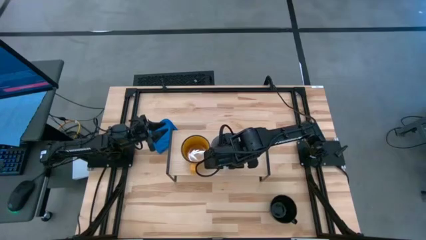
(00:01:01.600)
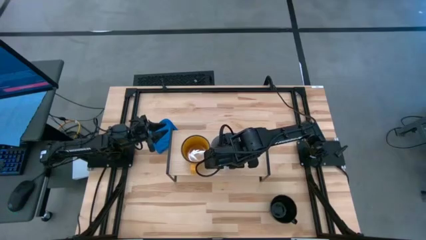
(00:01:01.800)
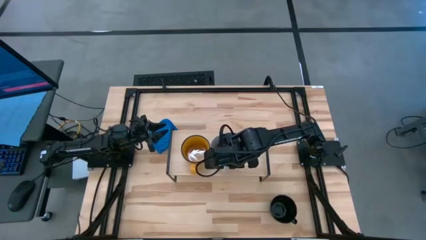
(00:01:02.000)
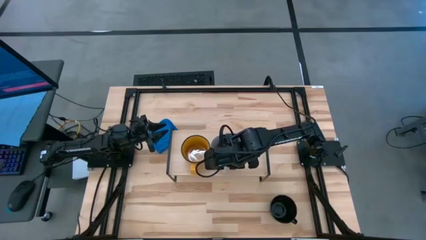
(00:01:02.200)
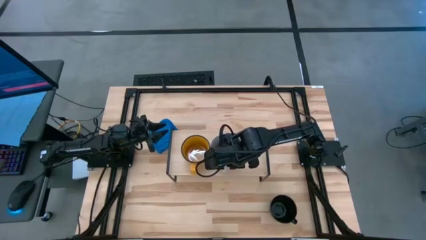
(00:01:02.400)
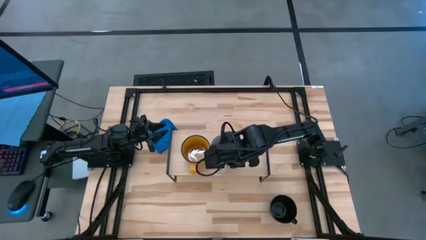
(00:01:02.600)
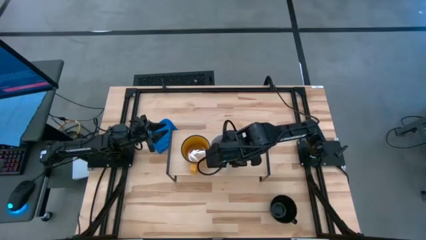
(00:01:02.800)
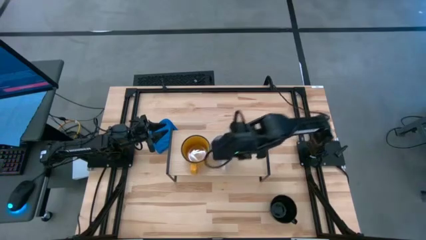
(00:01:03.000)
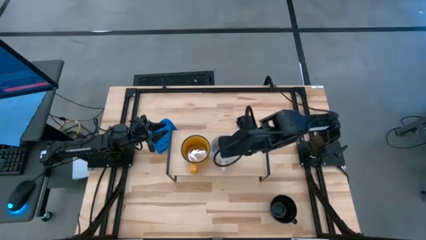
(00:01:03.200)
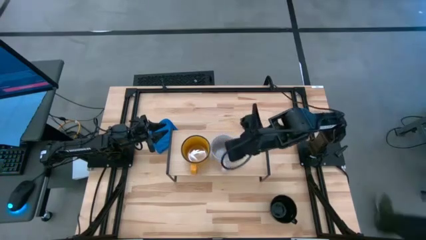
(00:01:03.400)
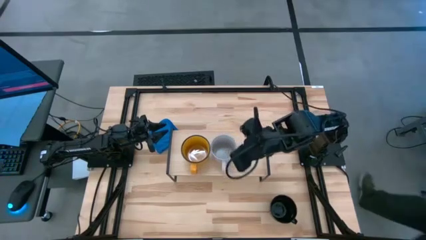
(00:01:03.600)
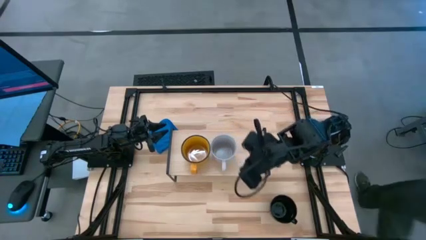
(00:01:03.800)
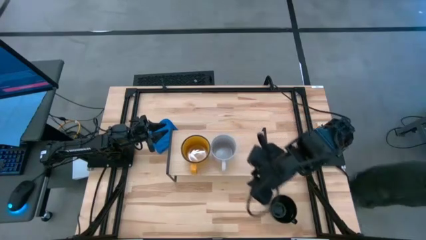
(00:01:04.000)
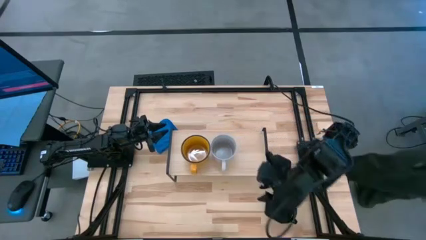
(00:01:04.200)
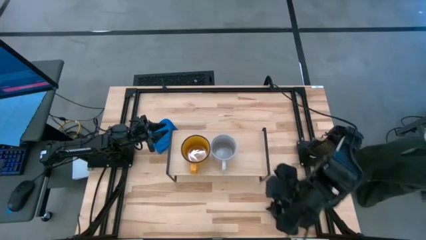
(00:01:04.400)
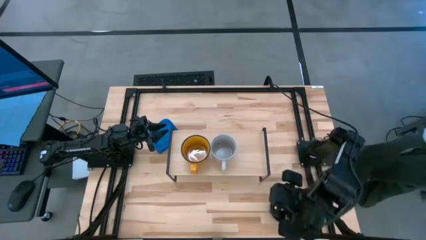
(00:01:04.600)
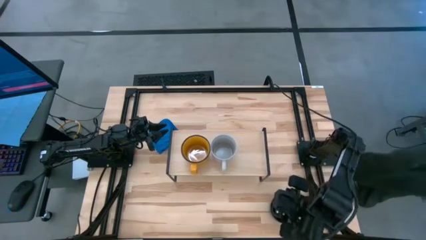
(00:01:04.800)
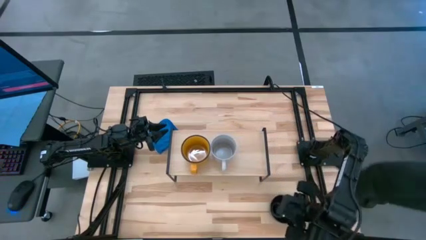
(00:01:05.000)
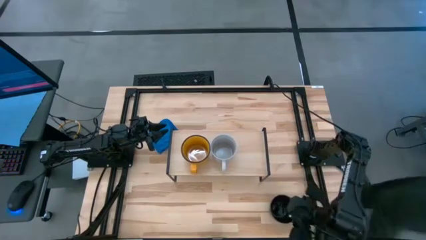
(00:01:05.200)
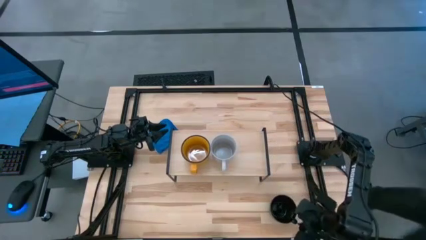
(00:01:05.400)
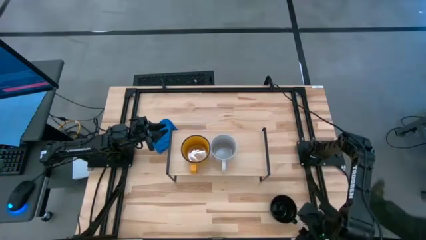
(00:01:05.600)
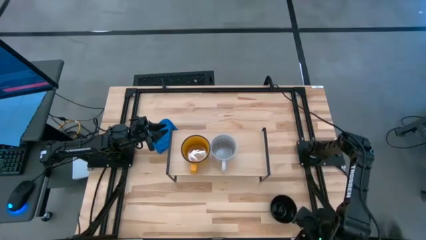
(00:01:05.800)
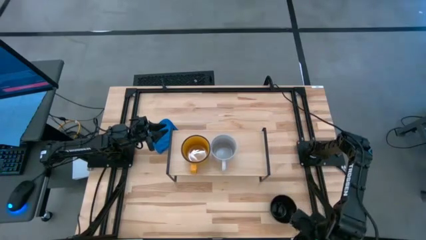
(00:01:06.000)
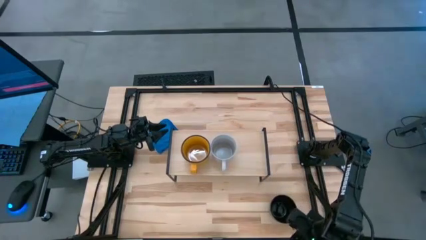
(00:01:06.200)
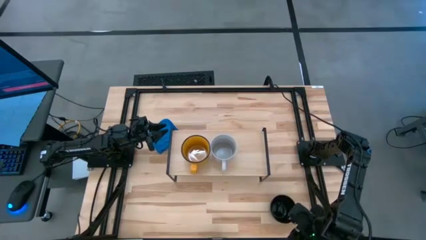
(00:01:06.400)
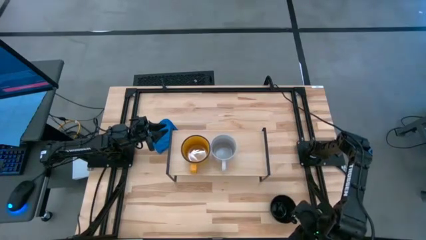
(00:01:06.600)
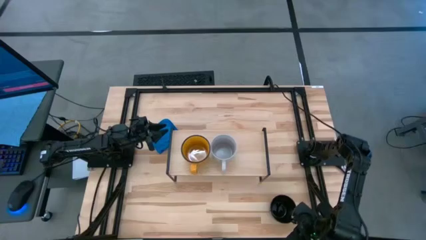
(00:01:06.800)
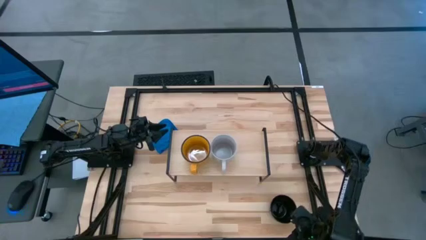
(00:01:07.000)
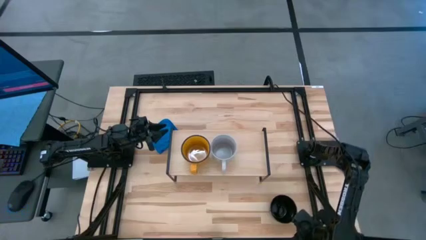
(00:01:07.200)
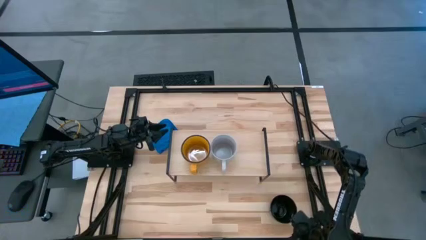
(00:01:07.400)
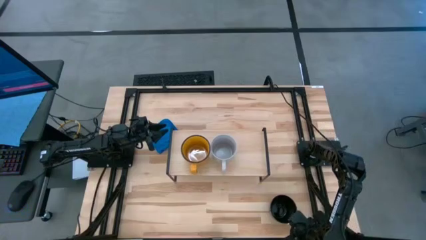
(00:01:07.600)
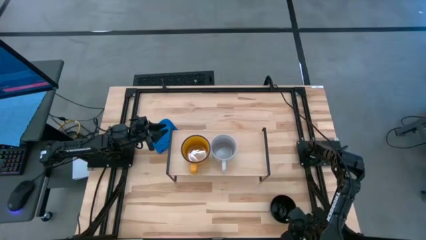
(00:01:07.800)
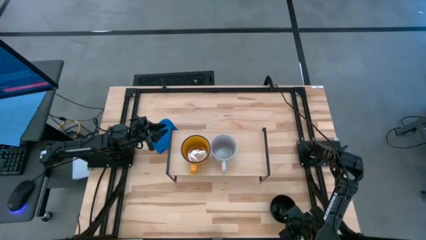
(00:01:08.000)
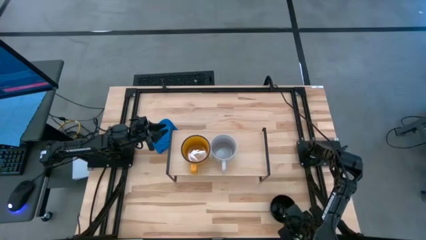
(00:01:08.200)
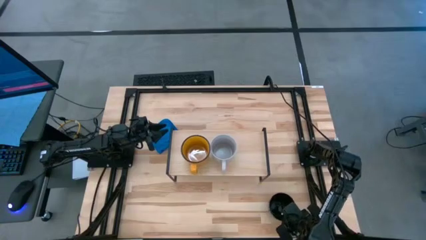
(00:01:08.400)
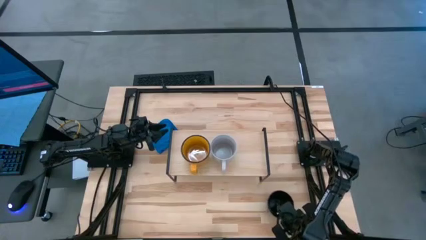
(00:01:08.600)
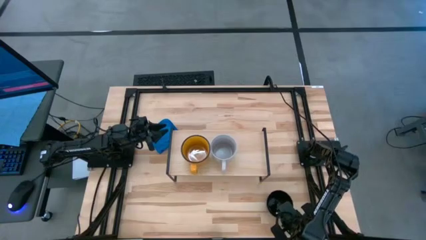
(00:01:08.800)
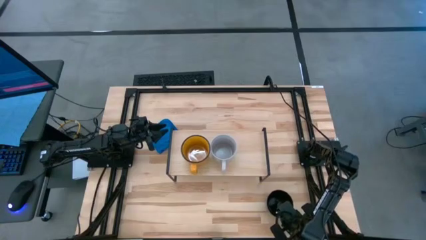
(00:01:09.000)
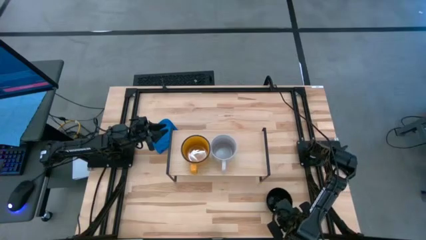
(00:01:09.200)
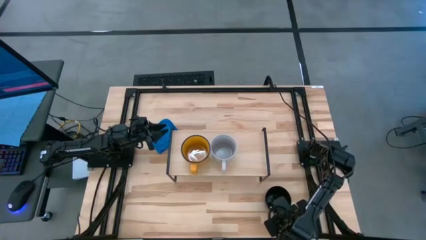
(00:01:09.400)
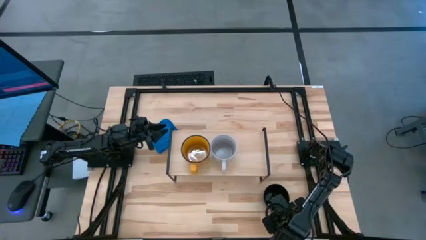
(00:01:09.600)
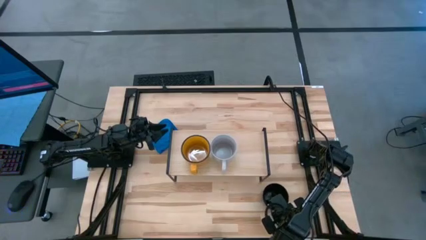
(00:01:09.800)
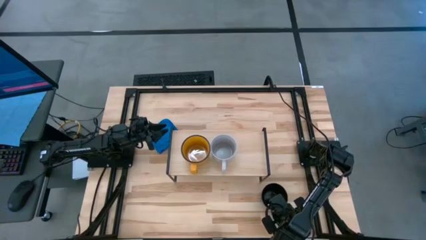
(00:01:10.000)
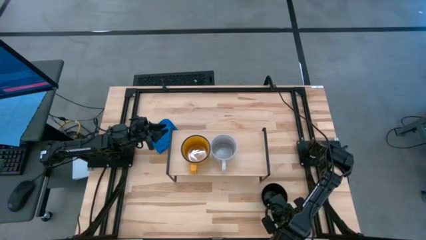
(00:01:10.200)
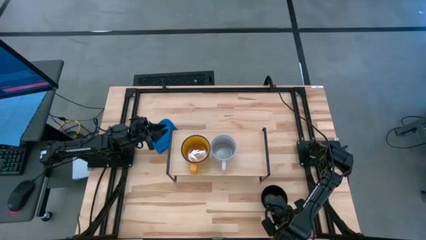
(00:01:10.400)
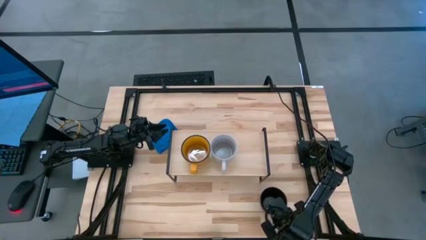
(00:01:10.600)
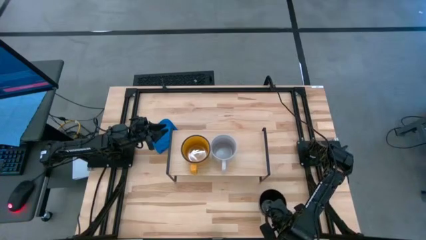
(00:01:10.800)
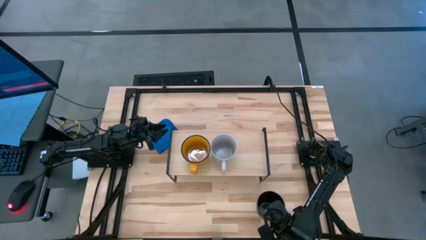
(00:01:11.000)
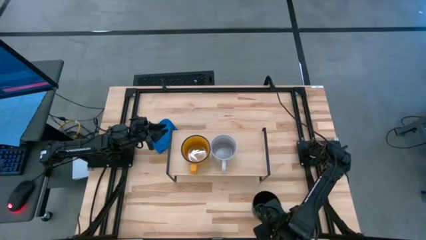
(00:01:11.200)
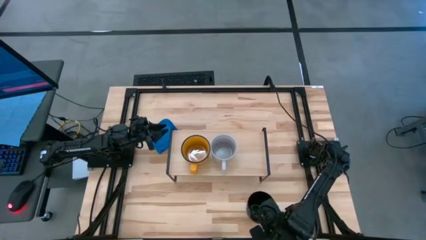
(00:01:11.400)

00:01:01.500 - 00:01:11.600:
Task: Stack small to large cups/mugs on shelf
Put the black cup on the shelf

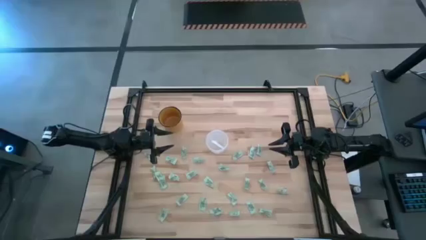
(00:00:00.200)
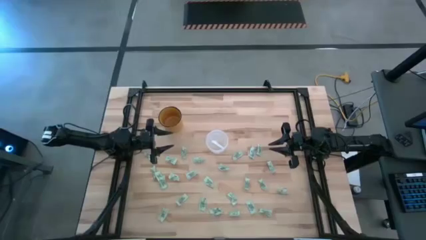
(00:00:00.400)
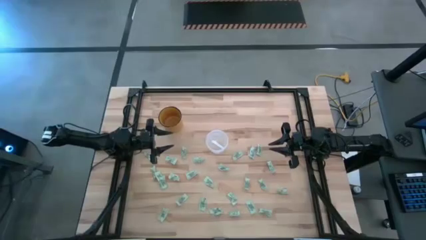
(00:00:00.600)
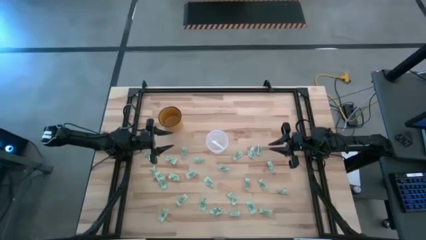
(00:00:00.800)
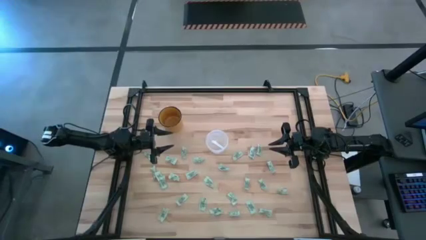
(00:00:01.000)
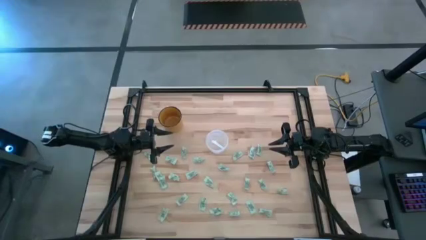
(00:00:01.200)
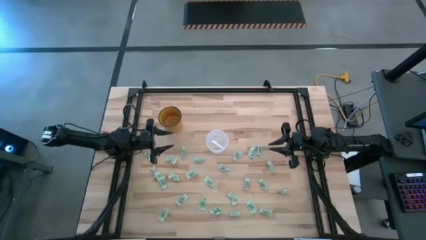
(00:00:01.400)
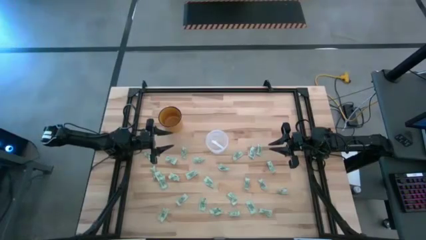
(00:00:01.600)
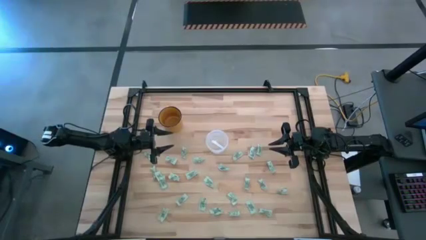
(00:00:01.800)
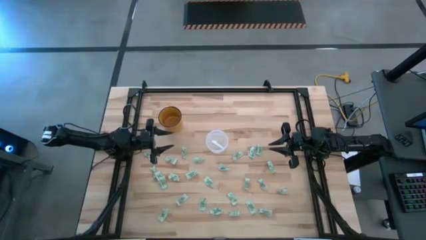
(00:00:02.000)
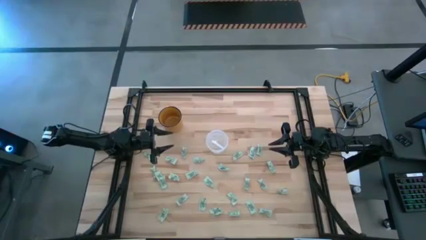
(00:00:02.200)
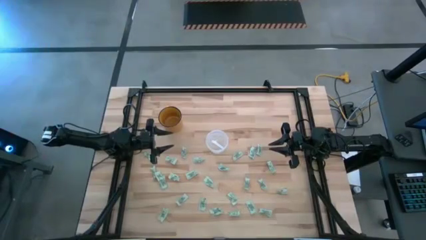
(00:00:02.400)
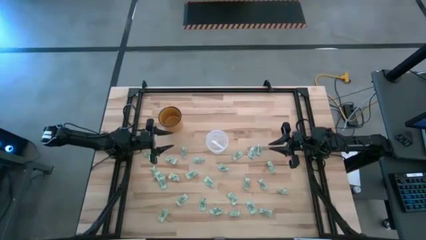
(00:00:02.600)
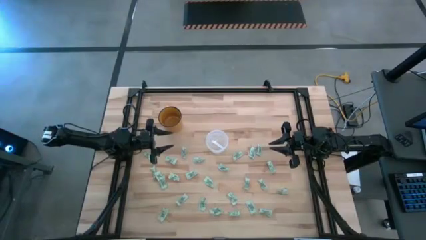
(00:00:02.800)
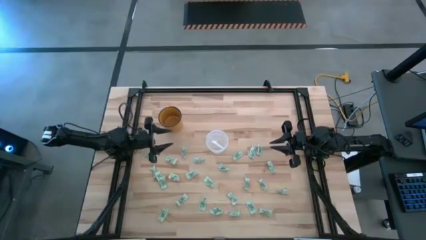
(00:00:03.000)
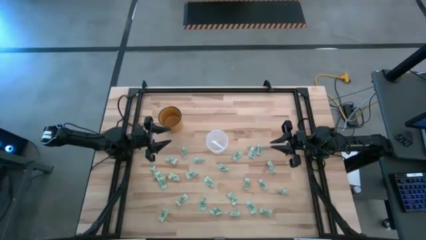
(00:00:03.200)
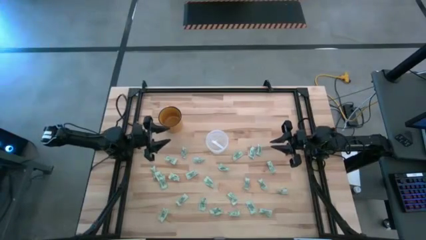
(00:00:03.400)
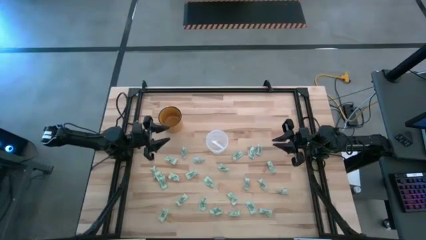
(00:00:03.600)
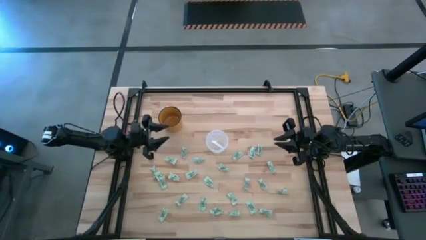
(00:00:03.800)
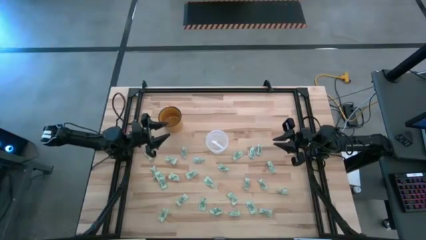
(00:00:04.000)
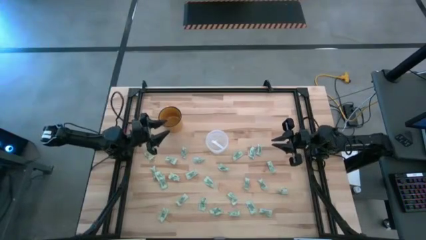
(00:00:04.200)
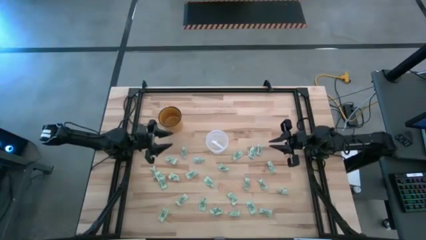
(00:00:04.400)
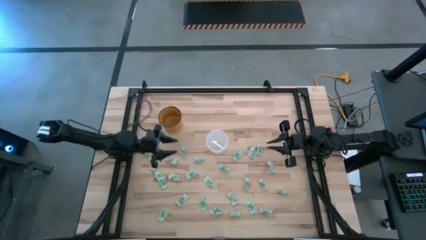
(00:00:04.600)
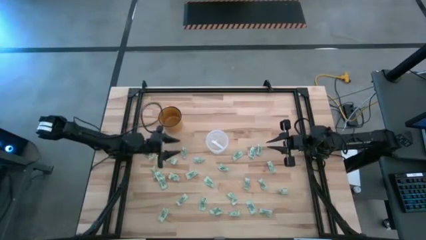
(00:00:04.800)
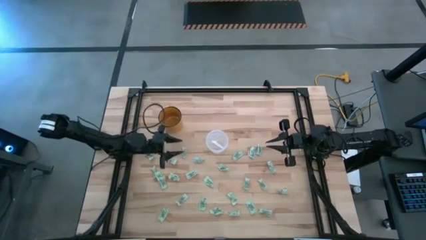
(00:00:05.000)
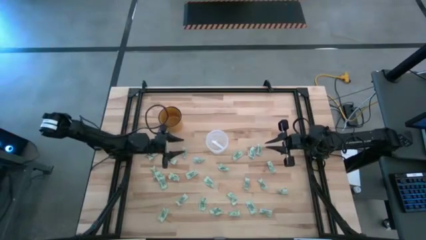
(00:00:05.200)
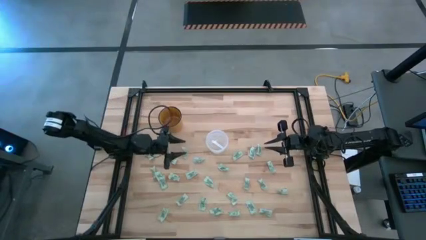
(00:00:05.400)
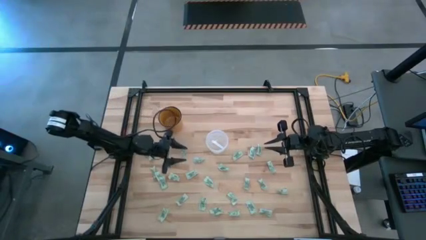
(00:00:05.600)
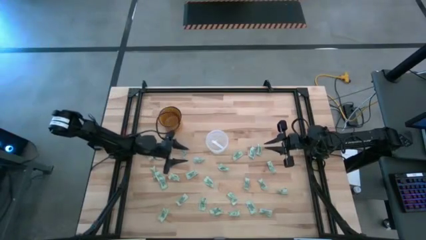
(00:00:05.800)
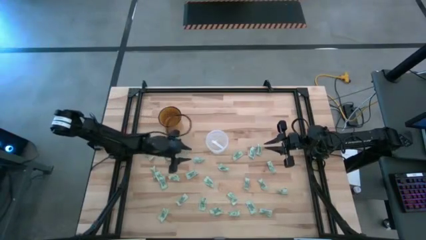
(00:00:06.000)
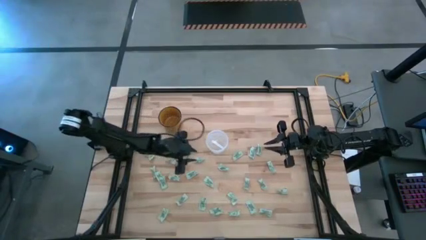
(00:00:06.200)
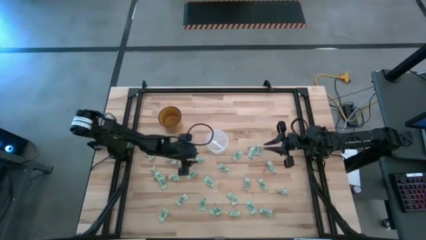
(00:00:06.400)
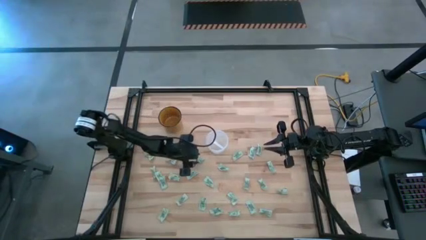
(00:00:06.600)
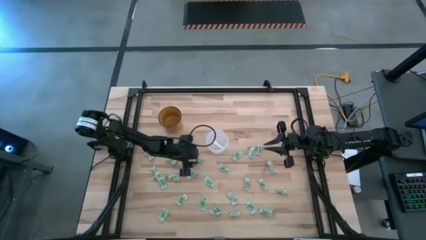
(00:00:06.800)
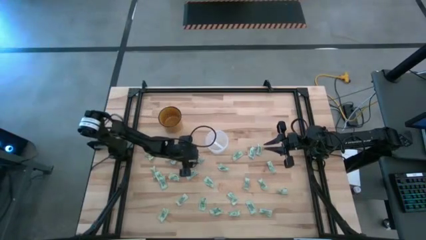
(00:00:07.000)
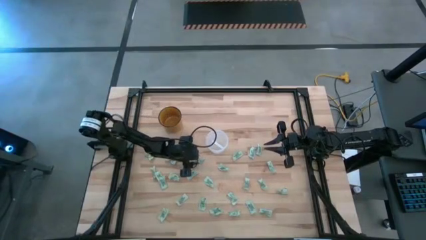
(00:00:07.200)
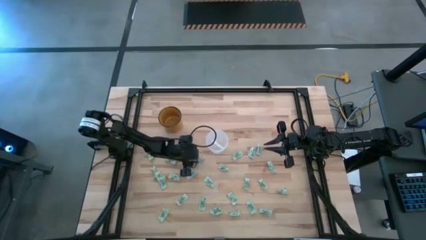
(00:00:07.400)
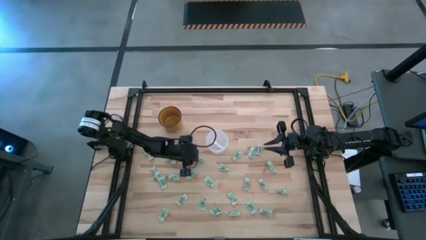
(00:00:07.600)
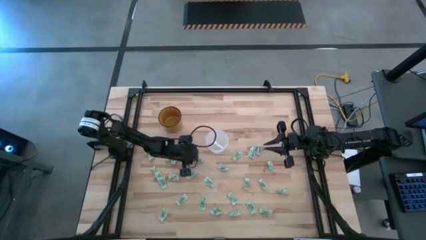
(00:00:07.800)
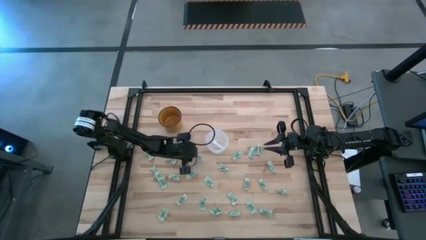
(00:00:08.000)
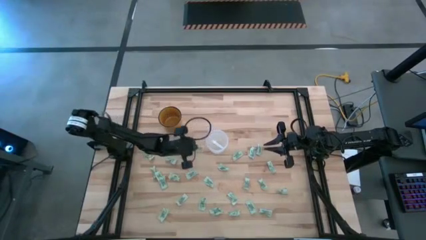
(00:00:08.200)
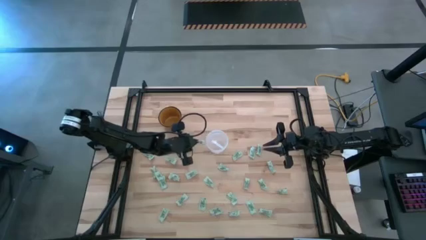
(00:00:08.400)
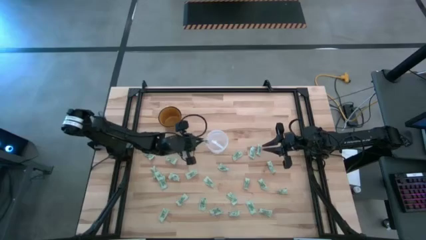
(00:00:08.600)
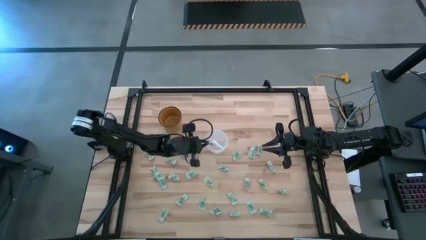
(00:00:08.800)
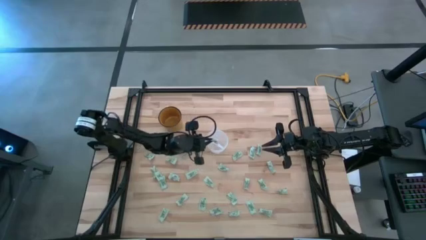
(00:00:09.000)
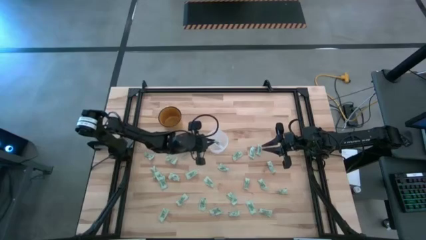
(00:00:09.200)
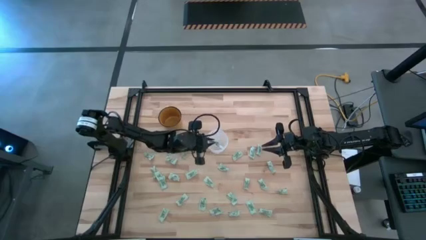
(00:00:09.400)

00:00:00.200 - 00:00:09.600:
Task: Pick and place Stevia / Truvia into bins
Put the stevia packet into the transparent container
